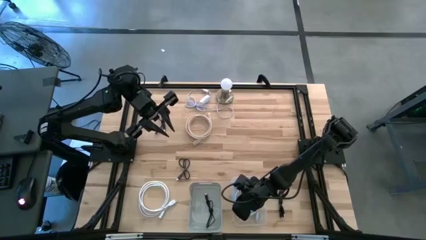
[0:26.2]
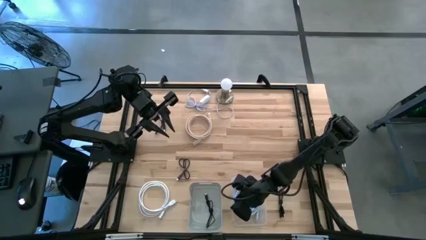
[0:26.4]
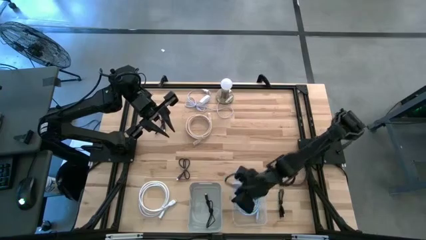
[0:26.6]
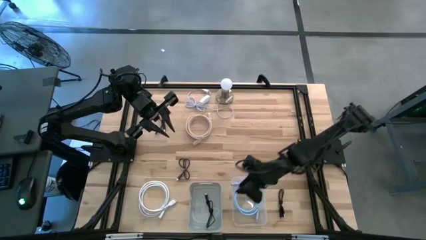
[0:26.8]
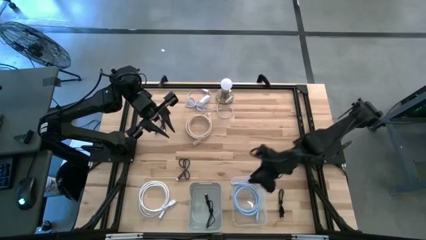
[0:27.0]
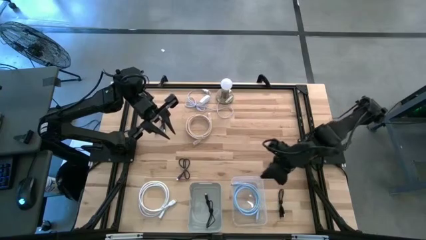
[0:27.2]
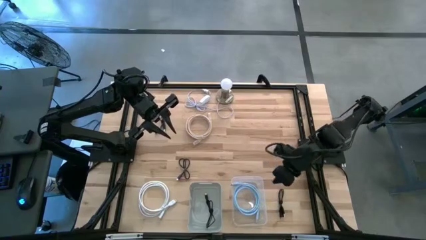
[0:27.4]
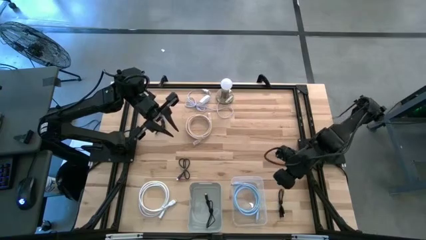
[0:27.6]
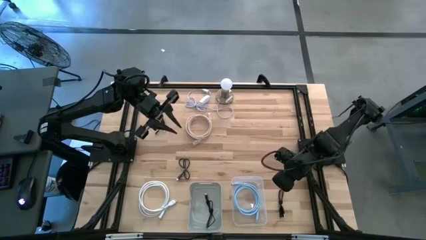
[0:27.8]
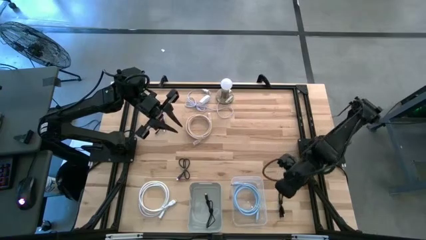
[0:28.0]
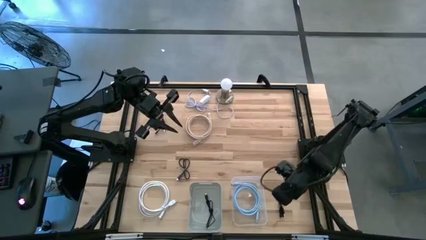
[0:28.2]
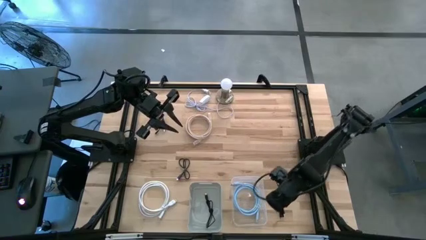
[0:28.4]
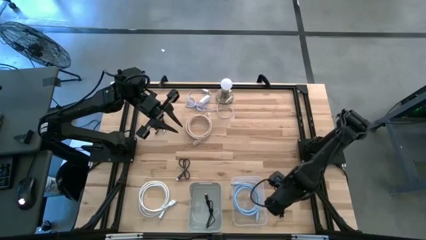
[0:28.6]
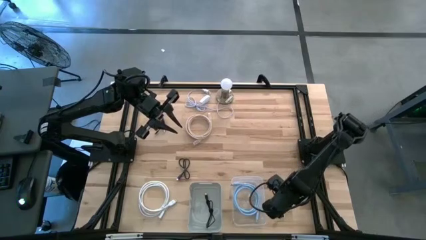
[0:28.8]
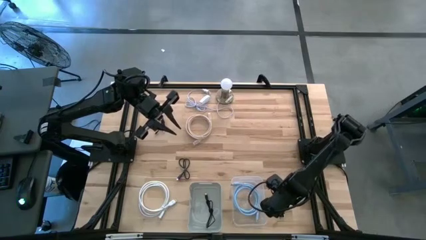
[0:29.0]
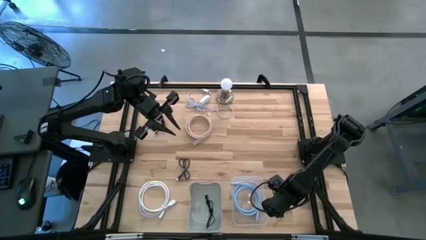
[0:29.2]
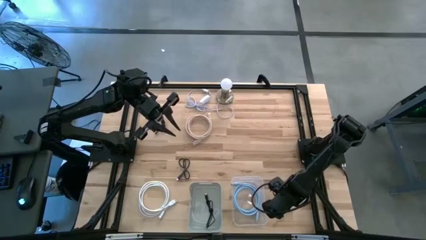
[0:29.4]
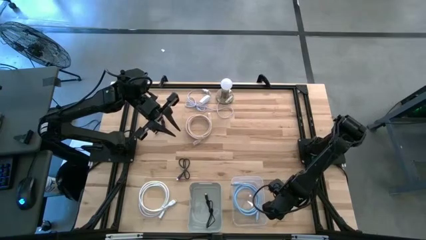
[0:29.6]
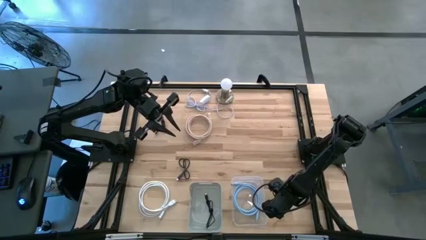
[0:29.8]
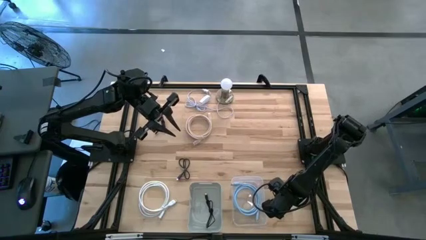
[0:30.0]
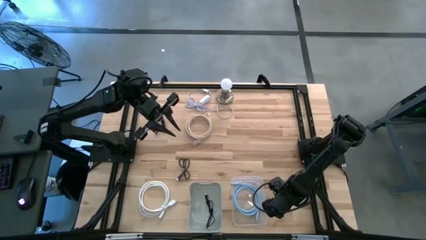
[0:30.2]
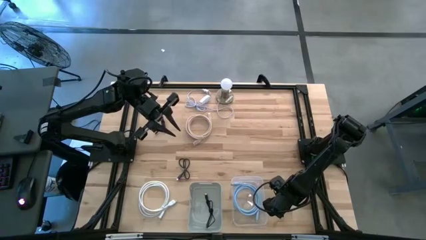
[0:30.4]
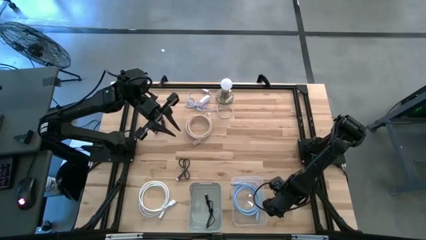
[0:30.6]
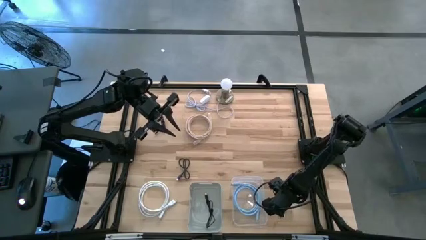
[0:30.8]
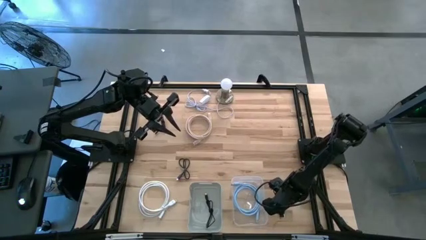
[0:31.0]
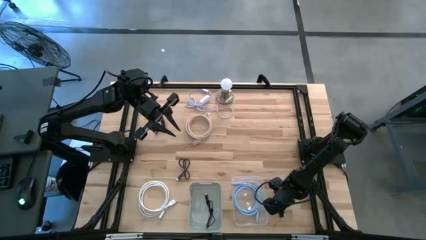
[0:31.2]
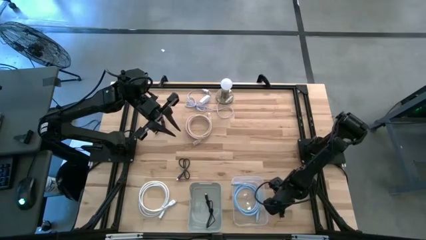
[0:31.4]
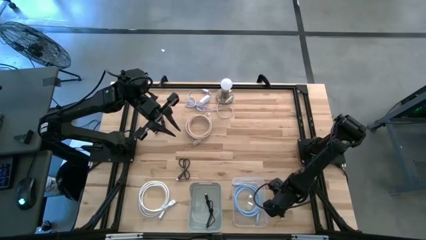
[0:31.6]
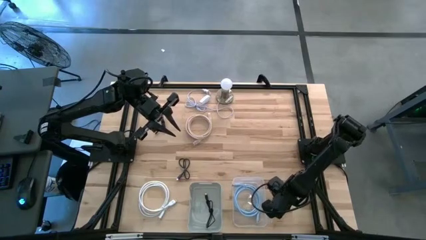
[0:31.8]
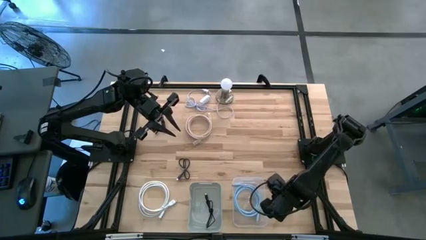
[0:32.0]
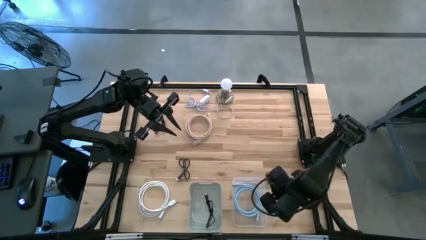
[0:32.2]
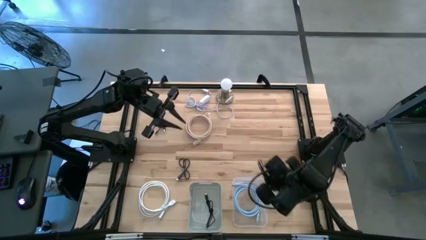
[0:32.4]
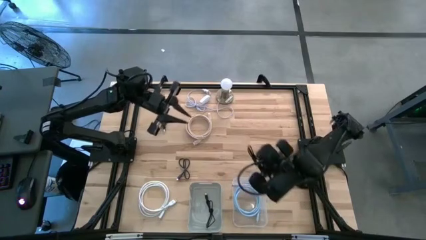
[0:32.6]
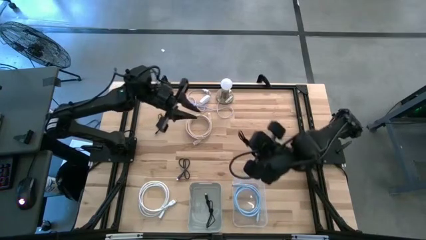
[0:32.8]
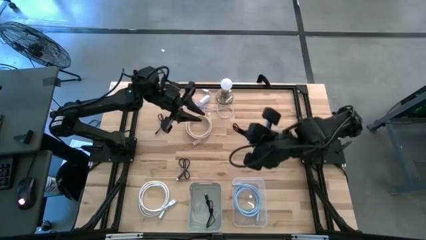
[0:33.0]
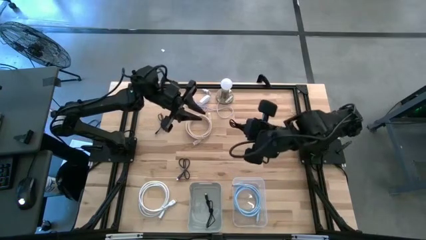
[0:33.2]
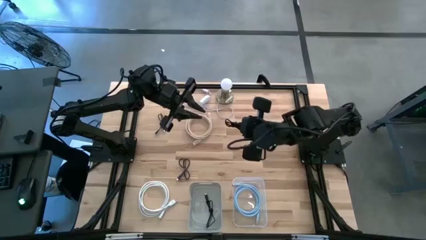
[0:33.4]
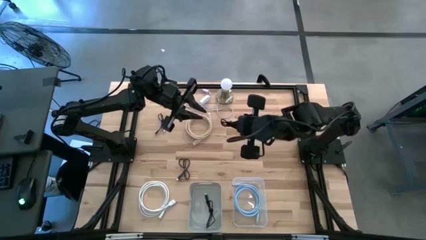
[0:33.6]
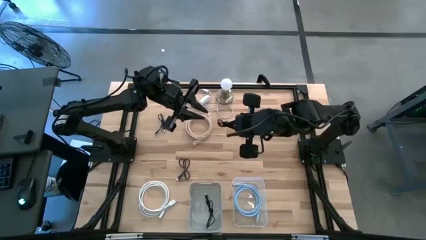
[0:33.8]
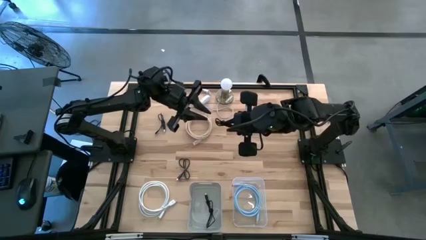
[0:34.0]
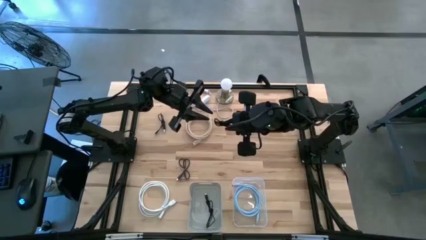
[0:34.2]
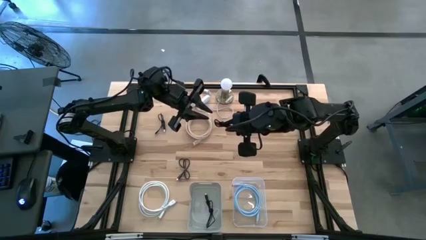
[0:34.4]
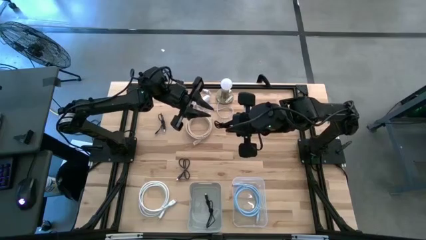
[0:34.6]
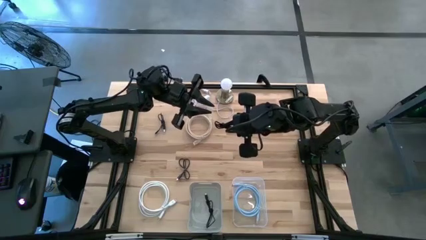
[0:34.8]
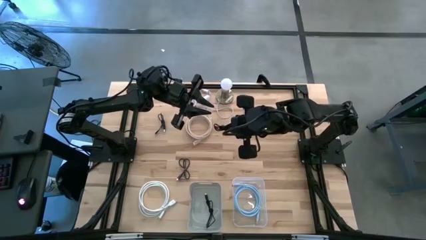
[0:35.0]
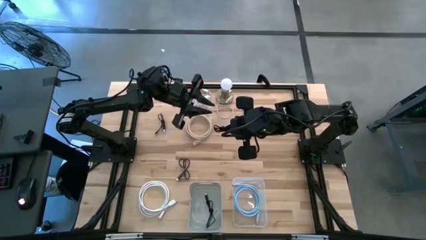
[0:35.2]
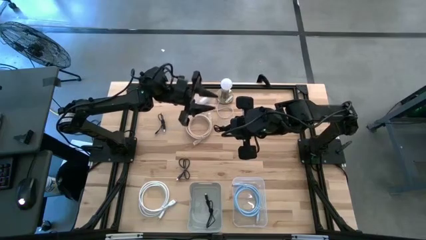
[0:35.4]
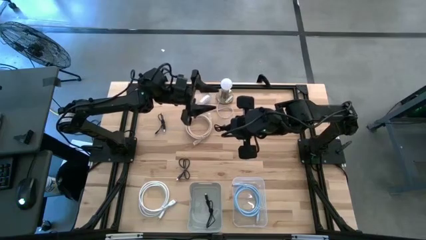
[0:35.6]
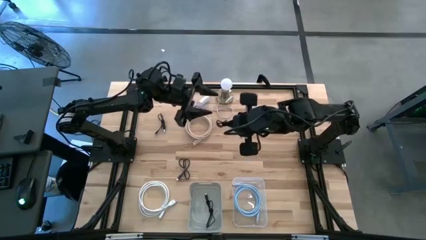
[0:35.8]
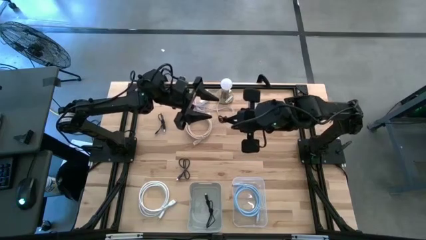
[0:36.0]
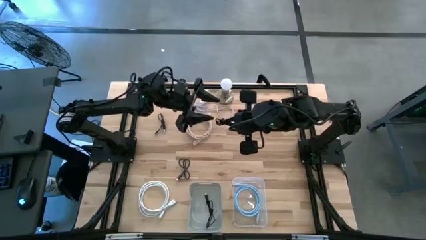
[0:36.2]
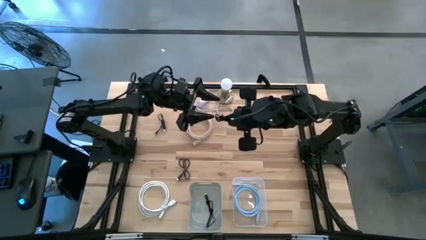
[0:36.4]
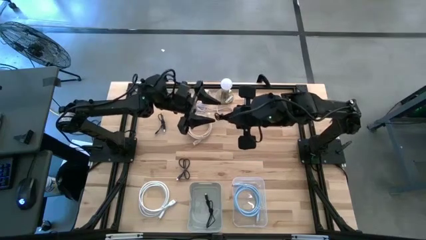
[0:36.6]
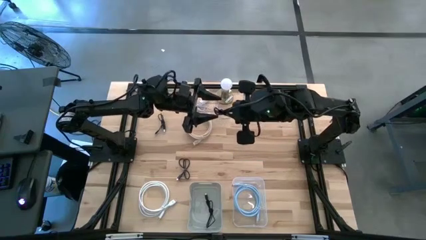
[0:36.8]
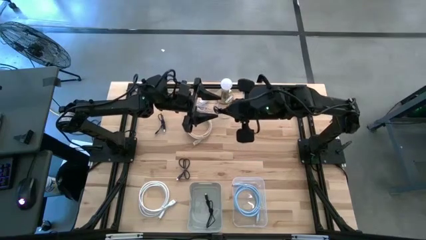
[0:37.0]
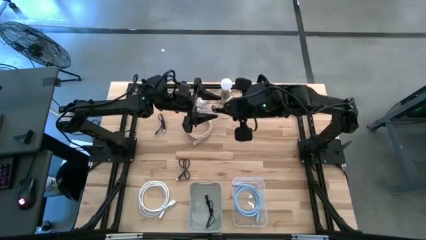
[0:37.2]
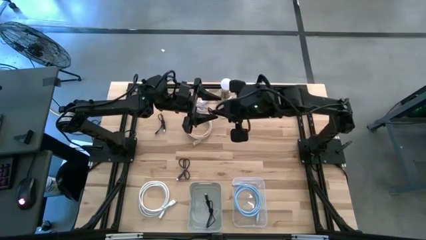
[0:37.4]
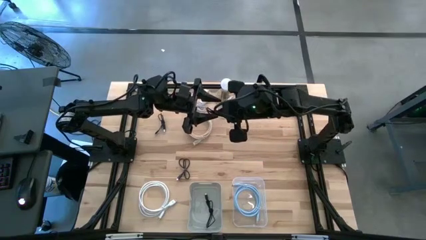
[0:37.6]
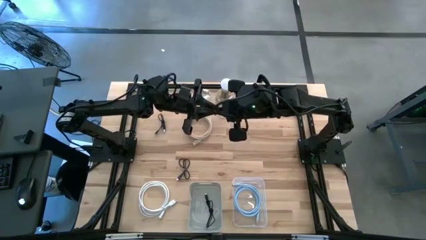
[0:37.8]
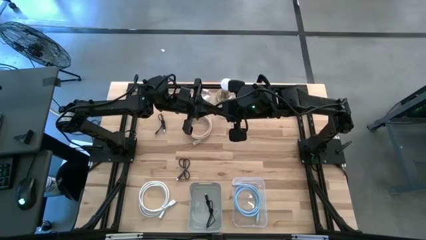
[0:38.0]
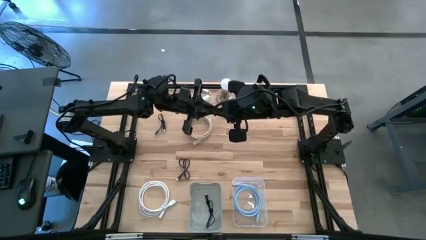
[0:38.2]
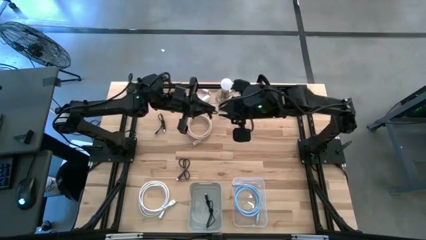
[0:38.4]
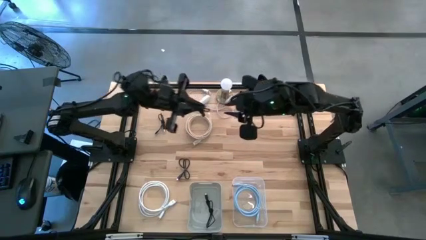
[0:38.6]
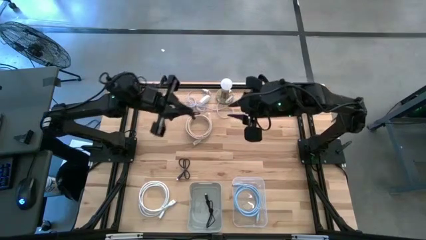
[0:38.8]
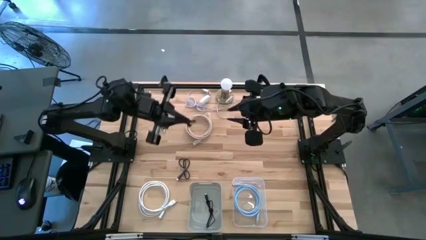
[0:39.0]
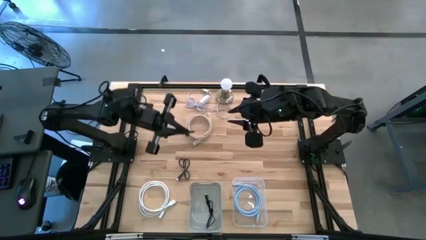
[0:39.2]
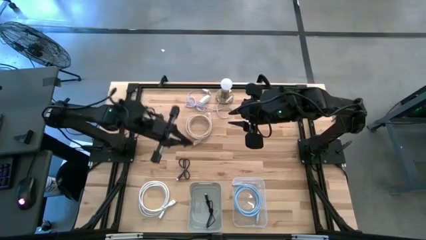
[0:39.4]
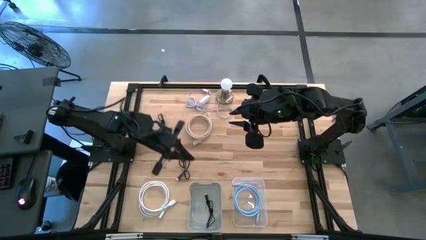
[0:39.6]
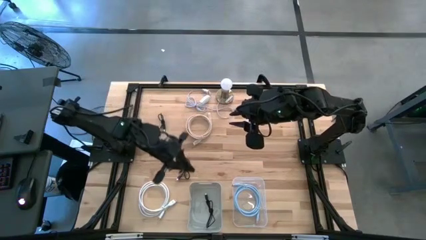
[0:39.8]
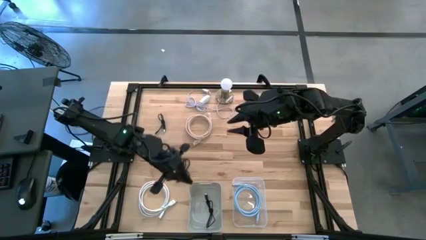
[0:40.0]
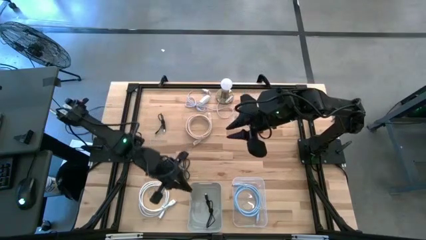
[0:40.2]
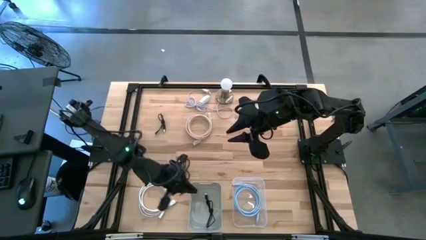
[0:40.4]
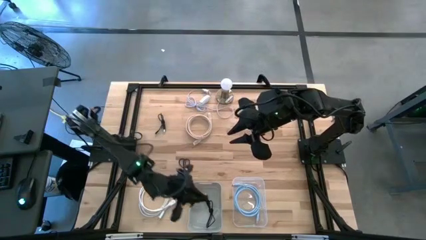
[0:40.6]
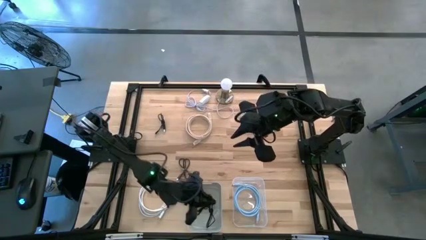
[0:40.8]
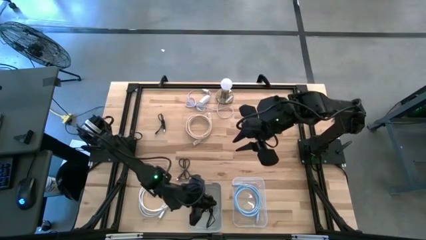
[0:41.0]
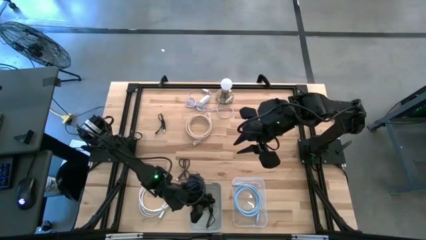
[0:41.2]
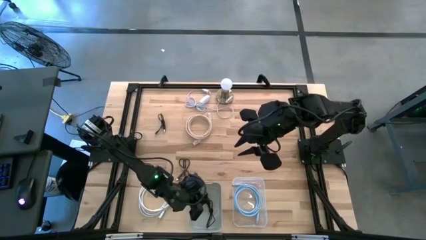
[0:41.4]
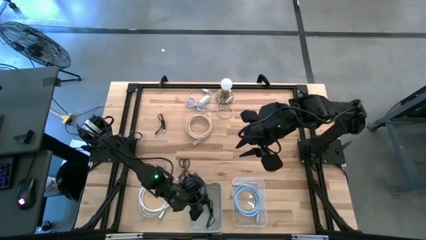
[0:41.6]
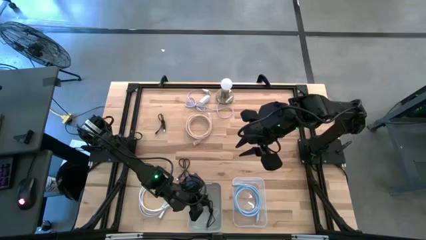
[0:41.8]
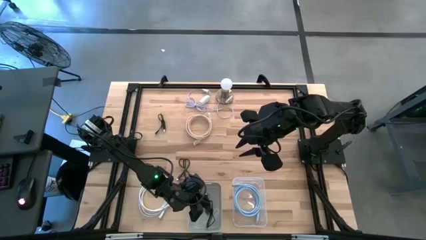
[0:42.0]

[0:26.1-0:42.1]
Task: Pick & Place USB Port
Put the black USB cable into the gray bin
